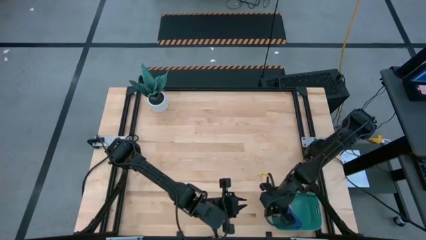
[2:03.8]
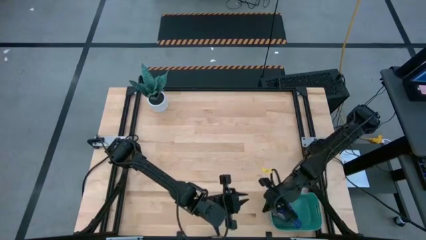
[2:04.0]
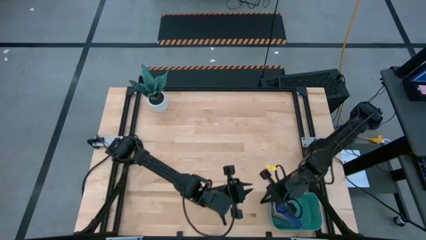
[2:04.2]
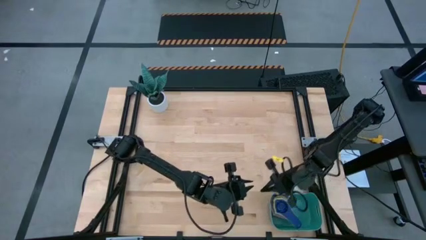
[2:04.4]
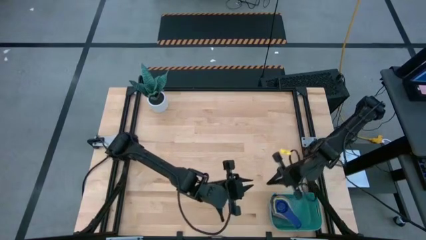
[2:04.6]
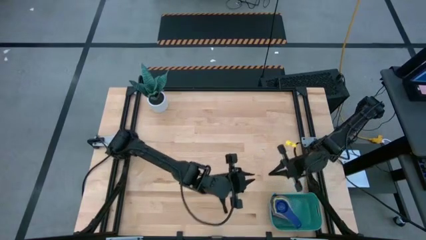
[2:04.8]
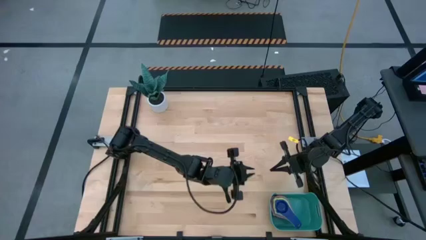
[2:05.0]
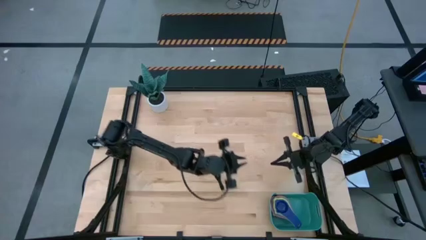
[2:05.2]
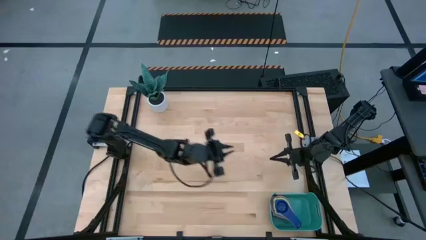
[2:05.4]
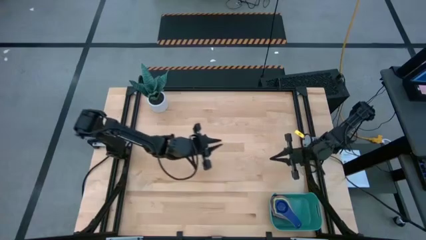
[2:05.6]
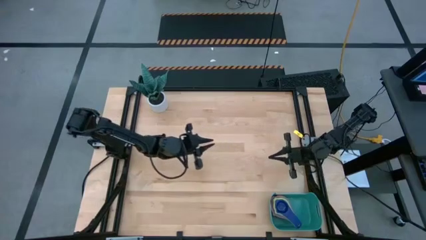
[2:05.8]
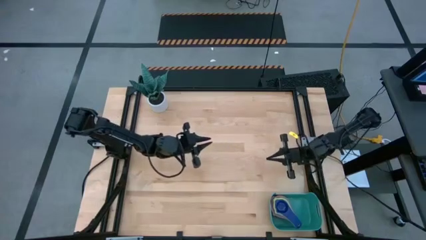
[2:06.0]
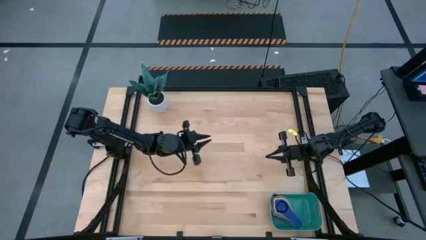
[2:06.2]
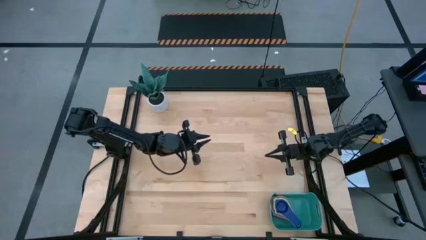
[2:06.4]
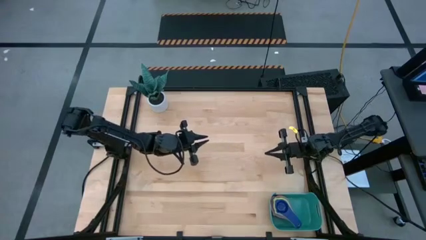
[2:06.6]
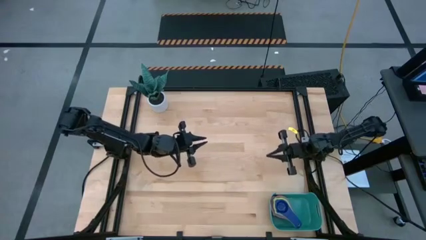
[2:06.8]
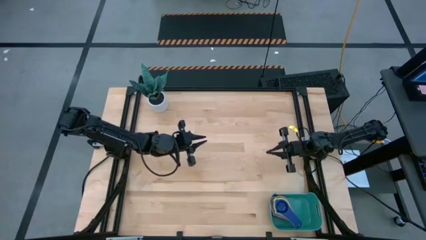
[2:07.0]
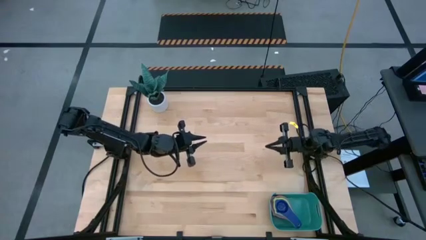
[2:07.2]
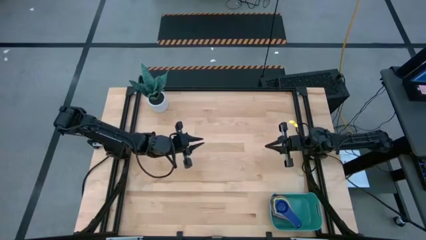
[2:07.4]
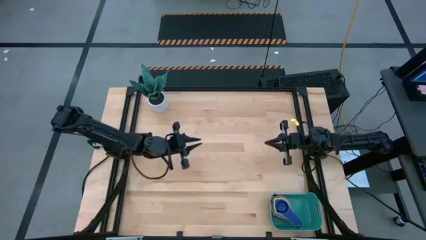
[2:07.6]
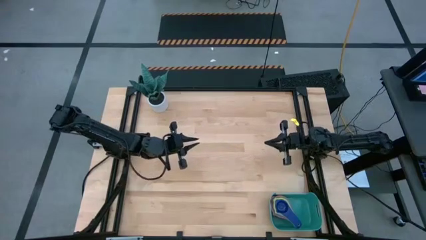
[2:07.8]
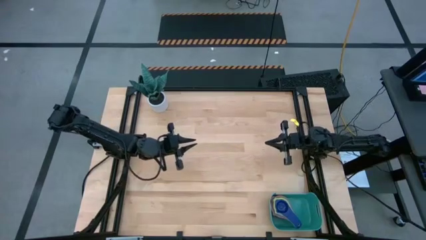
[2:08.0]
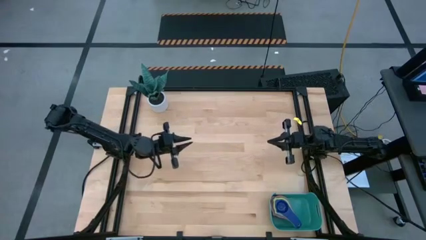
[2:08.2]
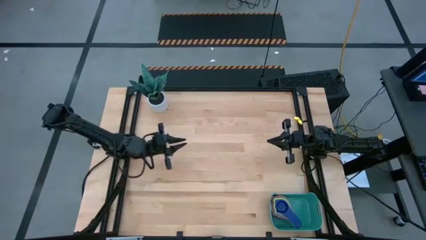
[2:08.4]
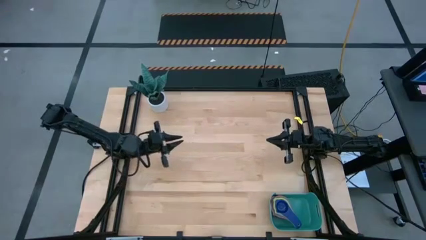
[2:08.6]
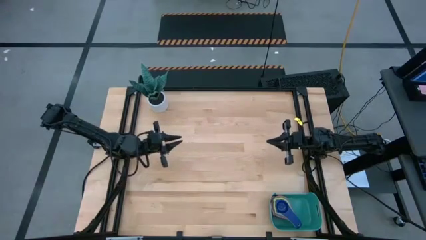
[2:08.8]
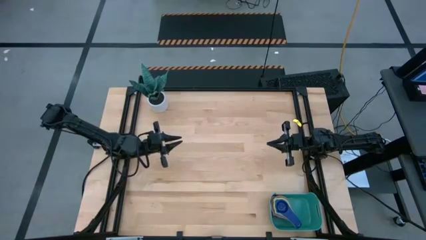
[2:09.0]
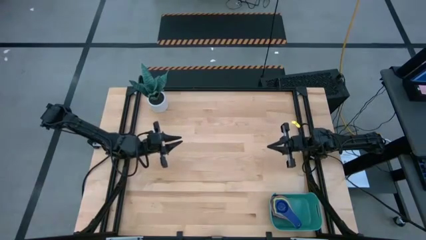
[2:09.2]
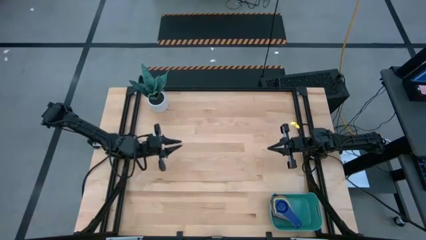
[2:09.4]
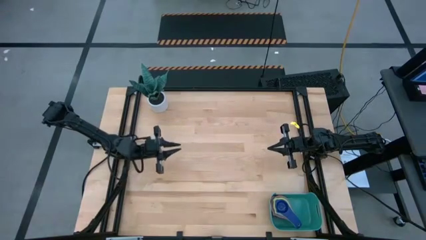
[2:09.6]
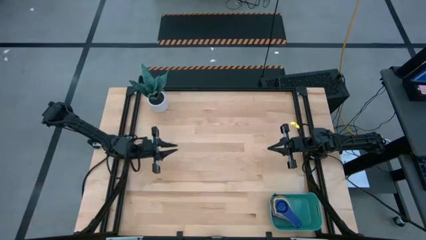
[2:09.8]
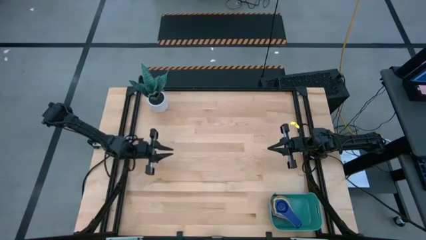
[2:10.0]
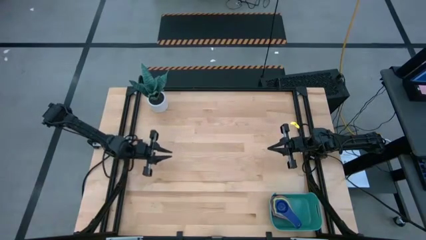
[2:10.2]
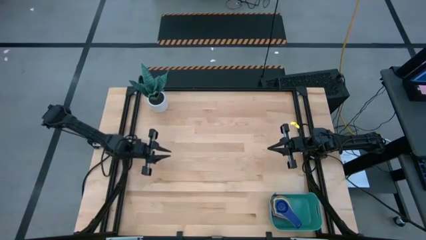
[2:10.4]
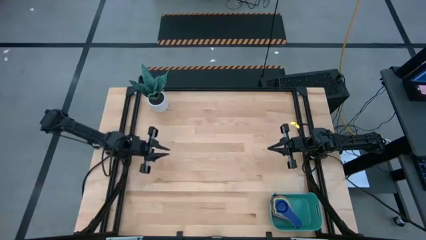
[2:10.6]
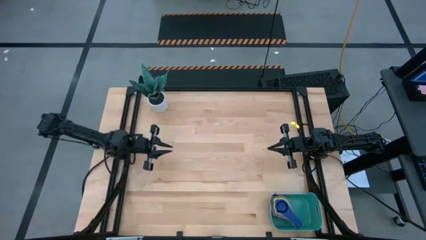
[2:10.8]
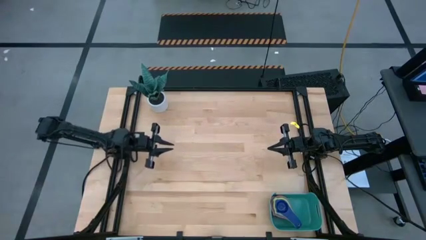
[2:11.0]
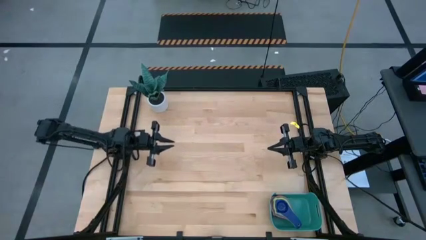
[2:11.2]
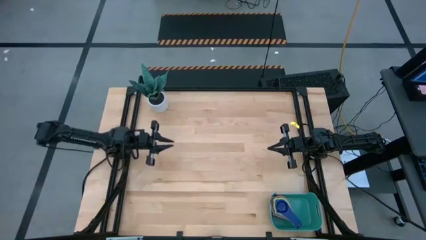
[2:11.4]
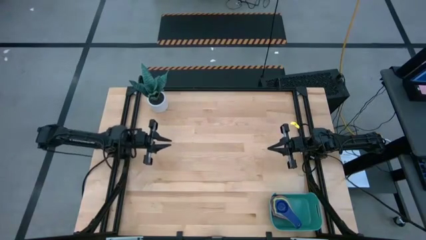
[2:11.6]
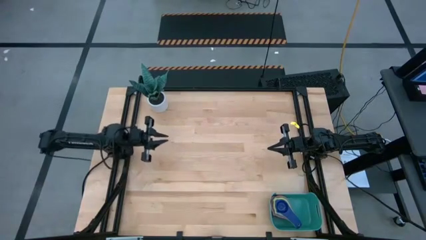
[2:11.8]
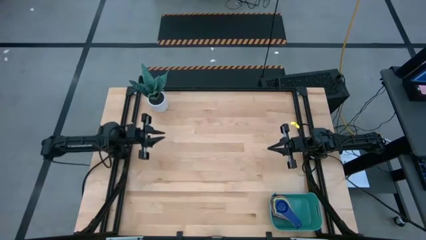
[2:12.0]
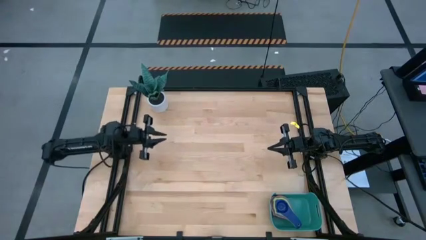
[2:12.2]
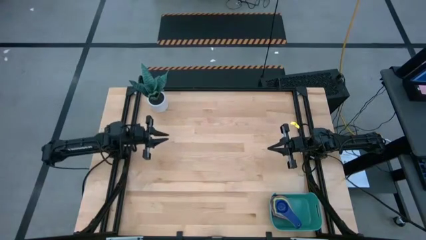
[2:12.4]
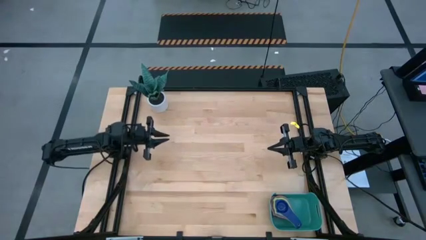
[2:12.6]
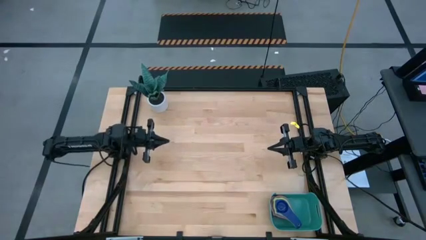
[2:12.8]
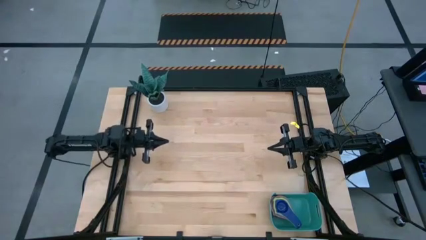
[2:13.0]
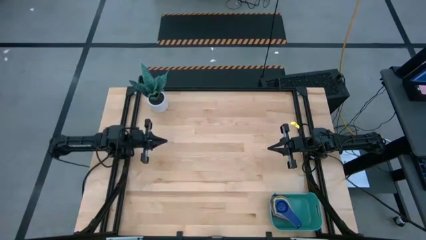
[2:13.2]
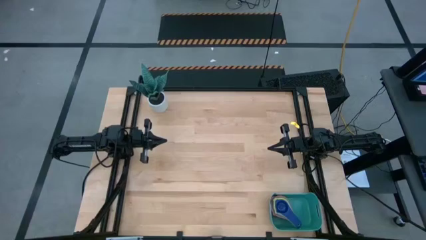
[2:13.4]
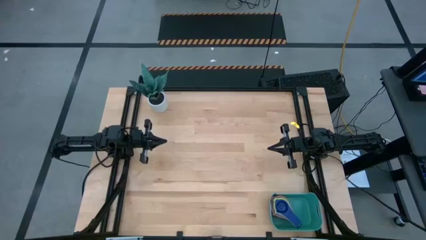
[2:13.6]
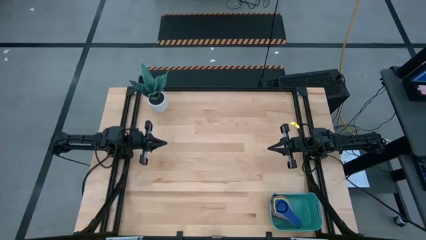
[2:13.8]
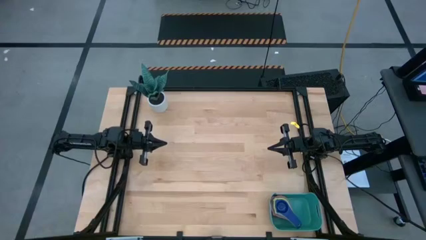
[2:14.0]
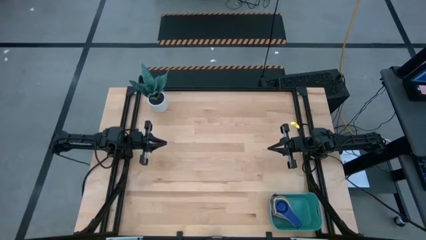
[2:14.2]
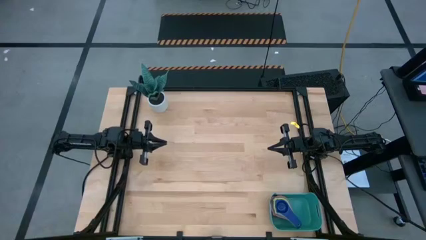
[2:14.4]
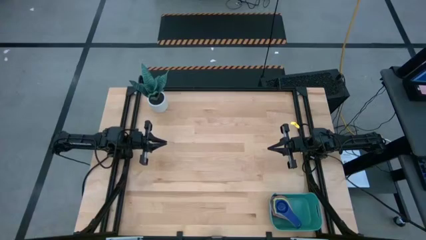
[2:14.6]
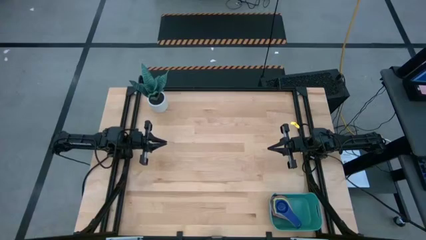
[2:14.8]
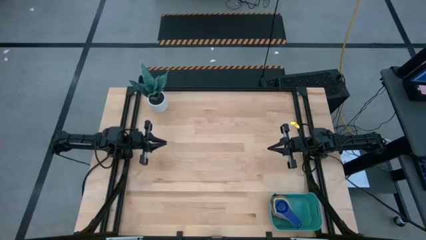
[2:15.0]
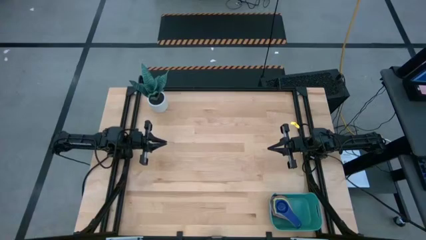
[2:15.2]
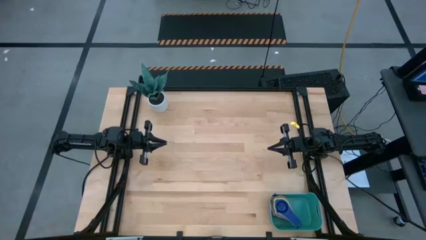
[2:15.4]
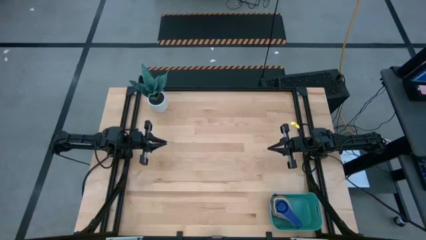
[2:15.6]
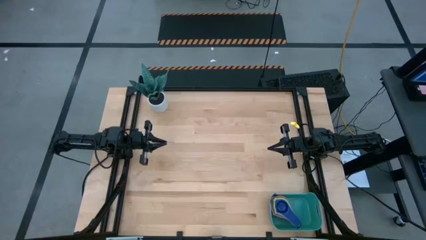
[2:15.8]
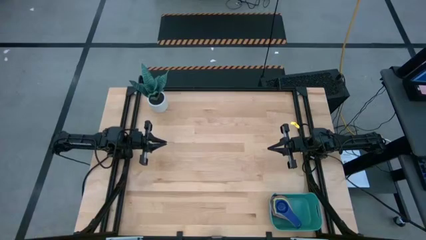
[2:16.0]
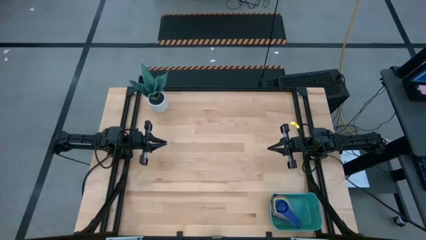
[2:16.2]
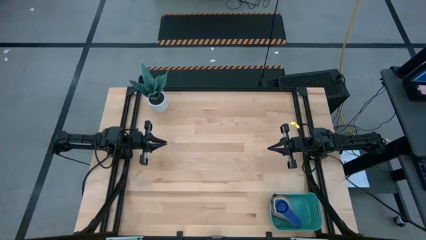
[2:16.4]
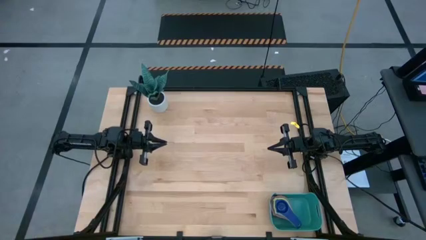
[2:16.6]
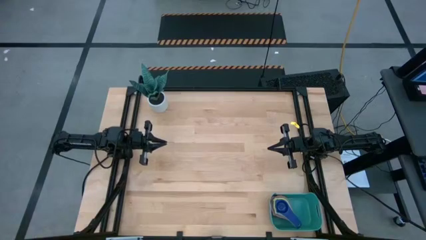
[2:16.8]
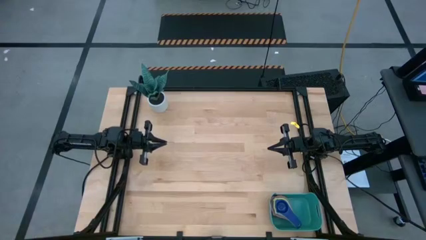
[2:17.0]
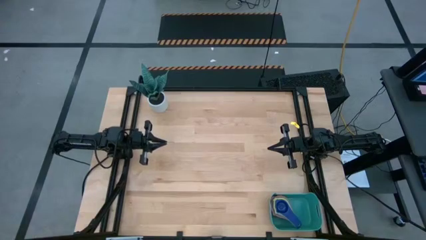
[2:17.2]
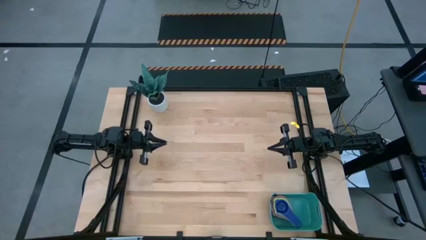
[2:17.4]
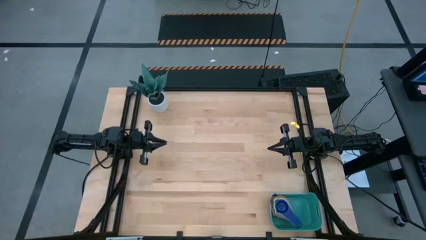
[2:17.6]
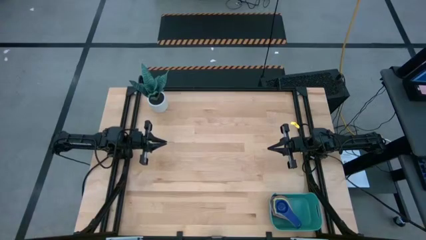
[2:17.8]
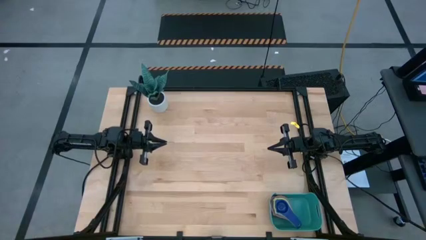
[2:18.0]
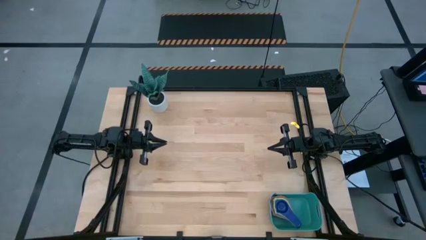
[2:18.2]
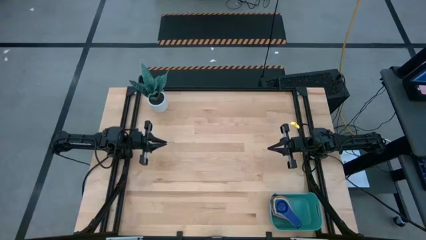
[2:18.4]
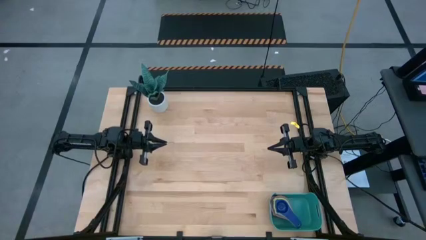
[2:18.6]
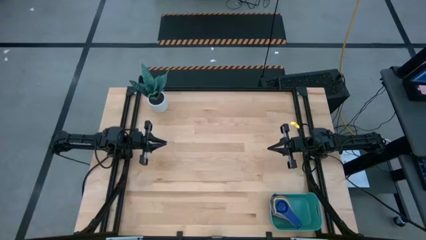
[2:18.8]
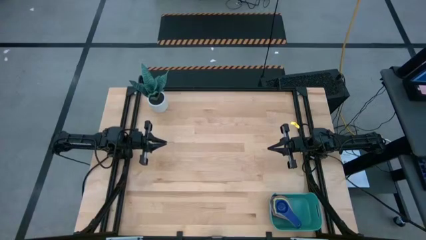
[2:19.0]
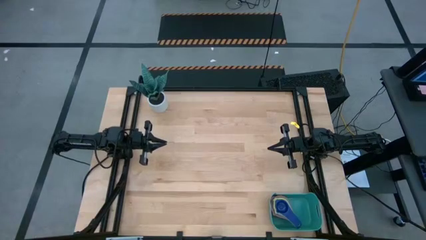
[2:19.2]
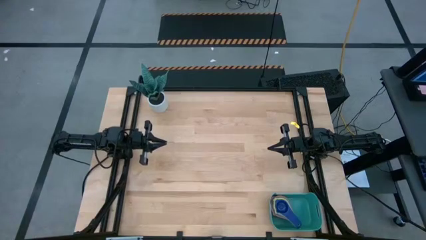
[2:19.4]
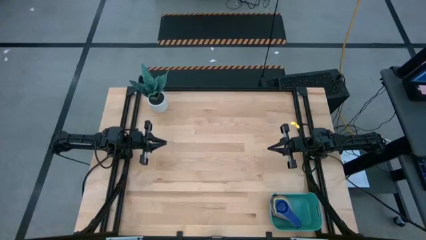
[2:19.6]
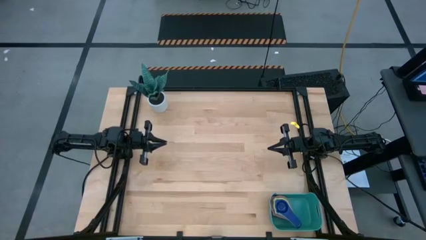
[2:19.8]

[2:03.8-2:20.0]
Task: Nest measuring cups in basket
Return to Home Position
